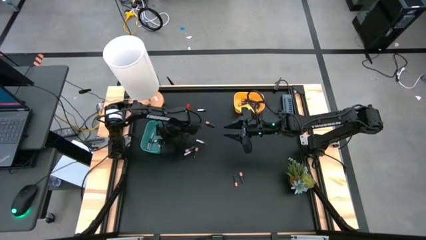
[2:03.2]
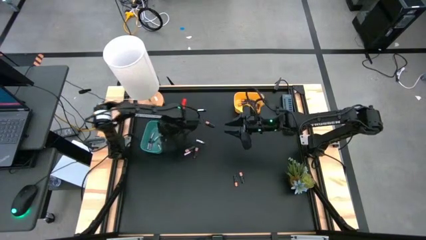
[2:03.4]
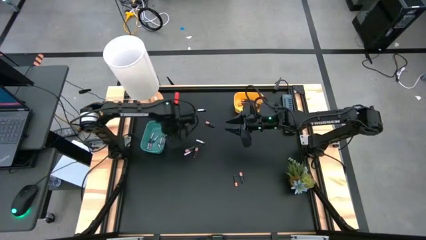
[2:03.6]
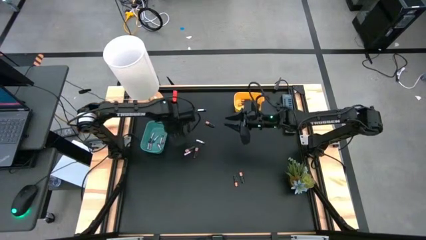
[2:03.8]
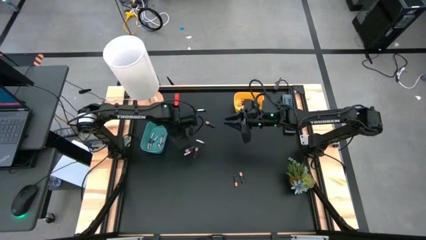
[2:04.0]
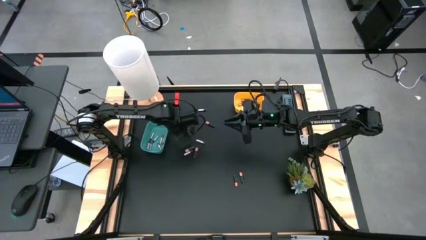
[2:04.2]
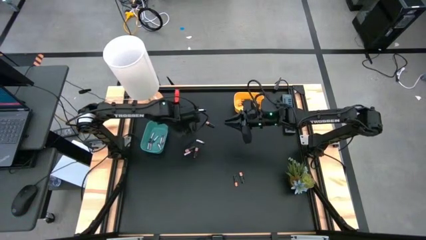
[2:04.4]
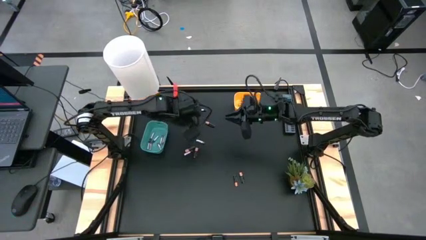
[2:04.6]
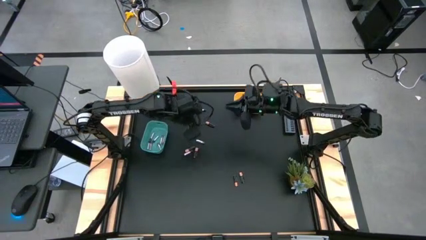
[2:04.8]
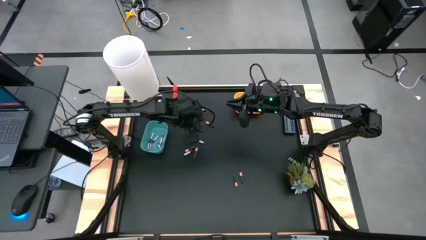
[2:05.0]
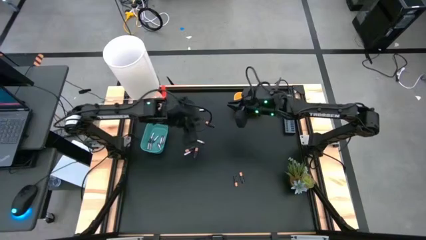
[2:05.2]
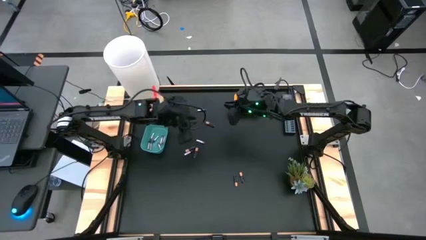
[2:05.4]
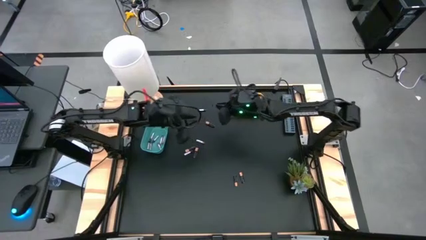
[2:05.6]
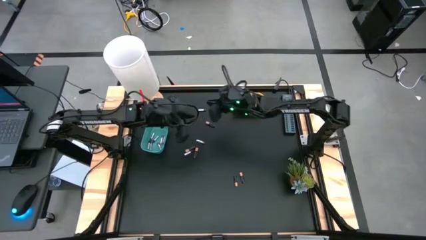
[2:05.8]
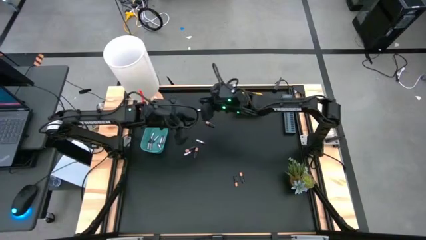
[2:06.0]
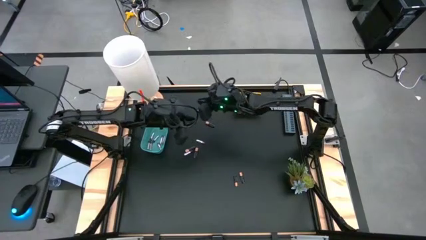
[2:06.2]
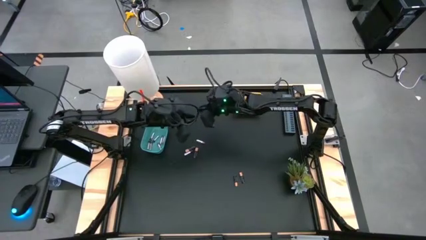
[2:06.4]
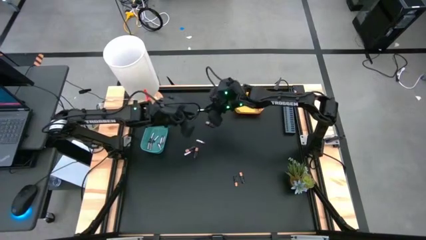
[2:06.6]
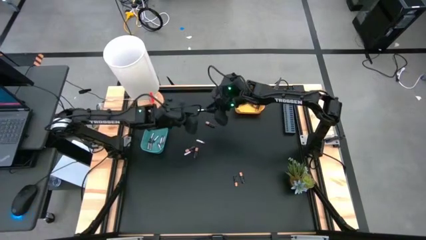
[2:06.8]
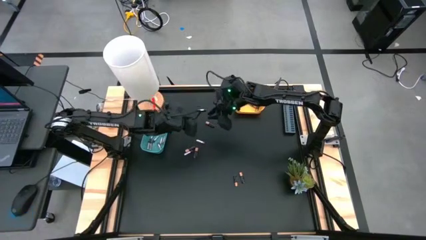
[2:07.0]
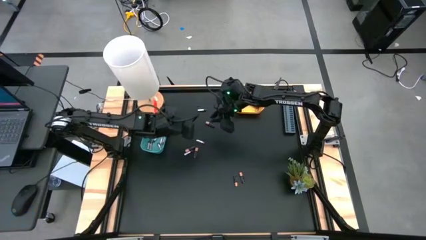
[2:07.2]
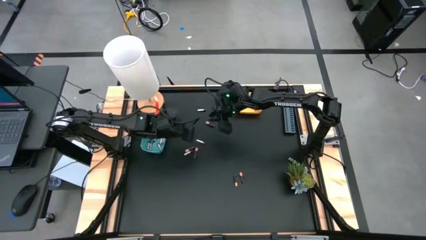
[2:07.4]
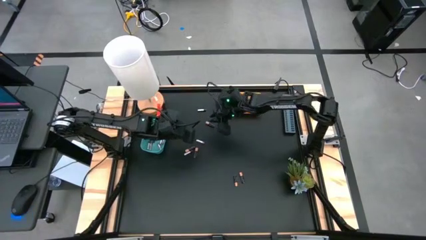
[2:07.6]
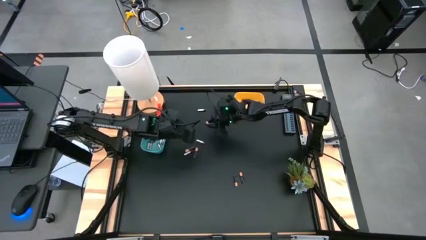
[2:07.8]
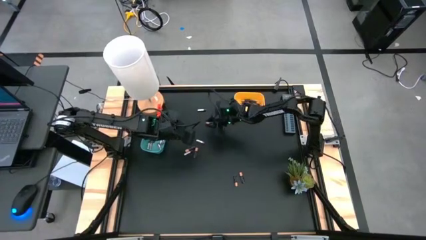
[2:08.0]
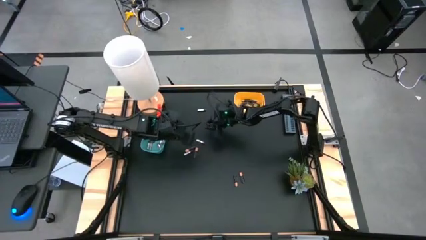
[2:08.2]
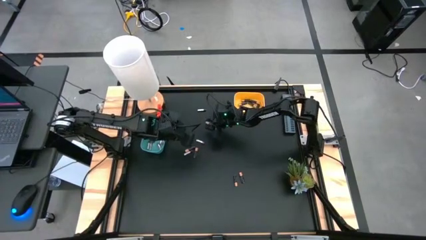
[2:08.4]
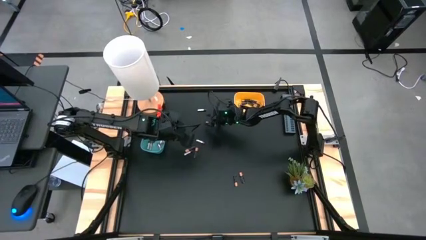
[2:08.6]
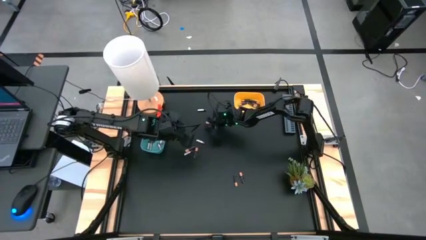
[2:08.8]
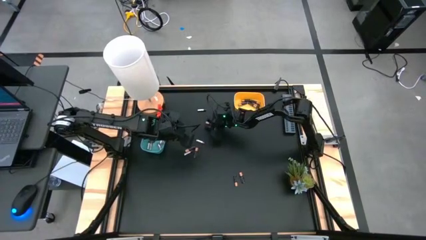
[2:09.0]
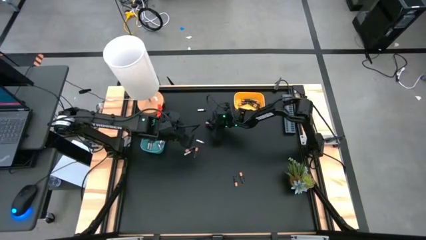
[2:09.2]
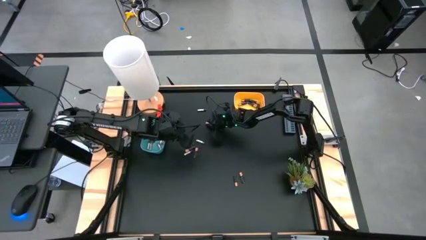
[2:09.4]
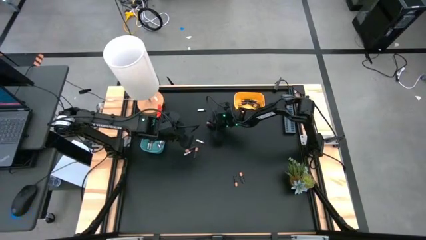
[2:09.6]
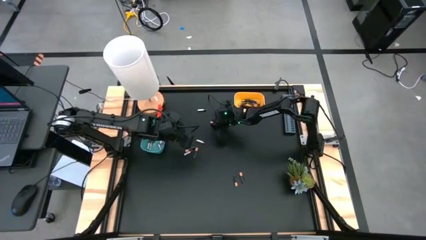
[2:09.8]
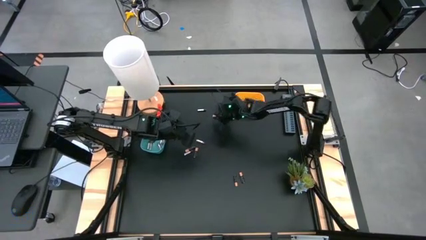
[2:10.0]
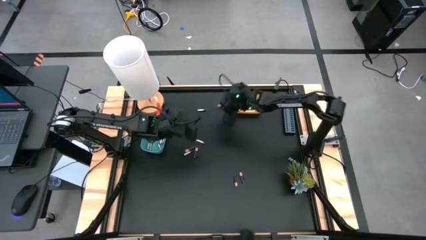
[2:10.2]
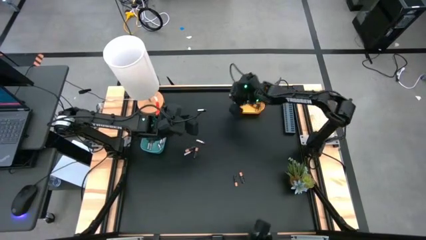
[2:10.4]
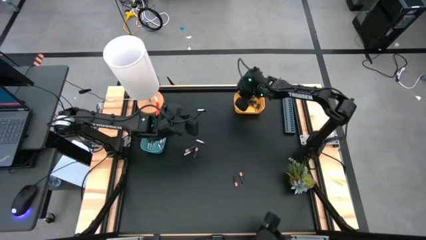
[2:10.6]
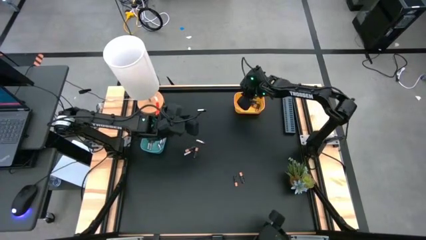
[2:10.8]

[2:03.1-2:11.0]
Task: Sort batteries
Put the black battery into the yellow bin

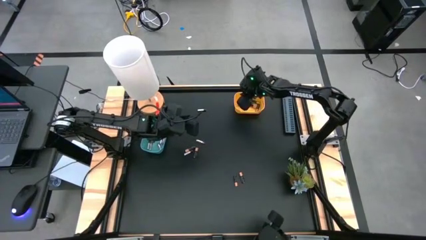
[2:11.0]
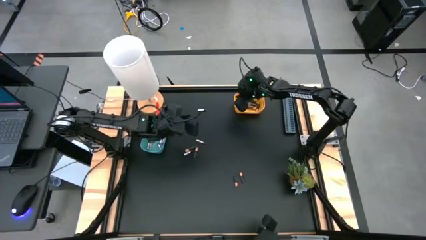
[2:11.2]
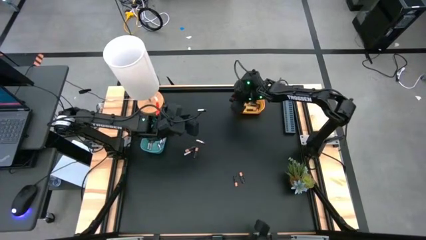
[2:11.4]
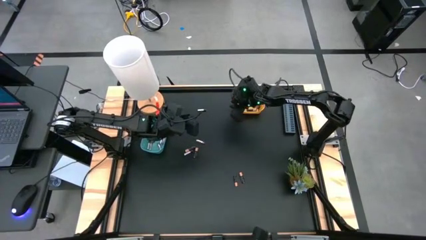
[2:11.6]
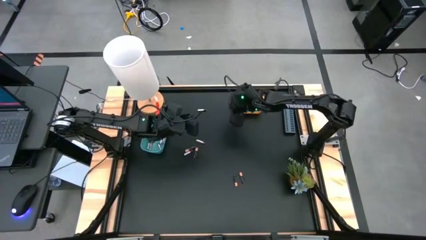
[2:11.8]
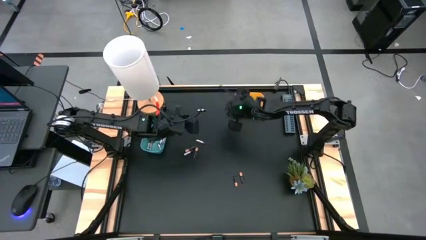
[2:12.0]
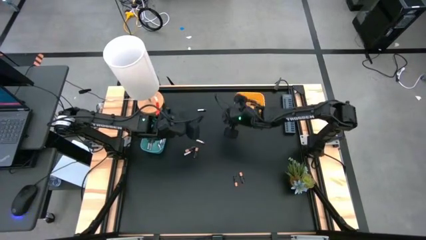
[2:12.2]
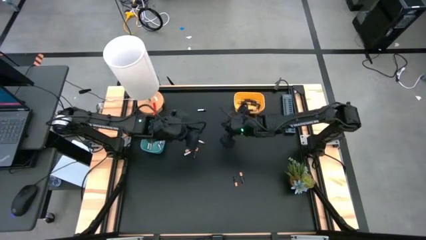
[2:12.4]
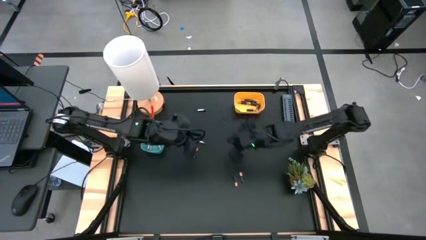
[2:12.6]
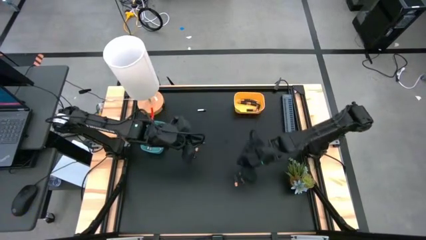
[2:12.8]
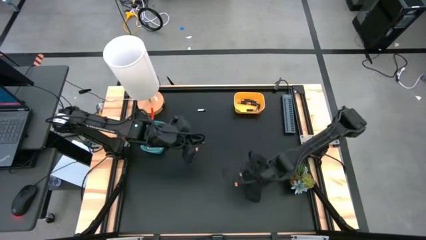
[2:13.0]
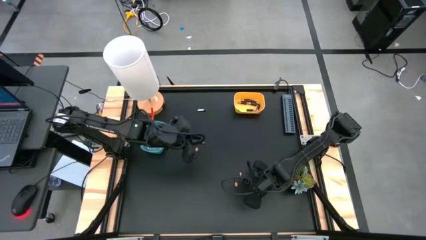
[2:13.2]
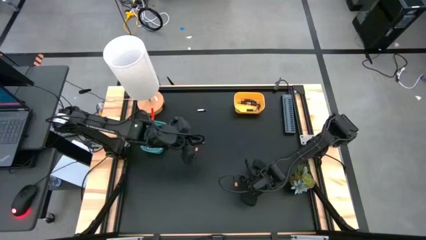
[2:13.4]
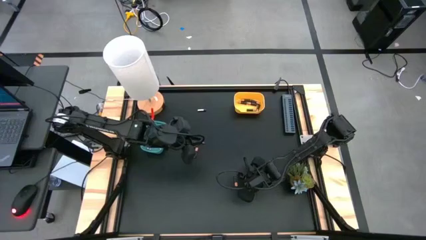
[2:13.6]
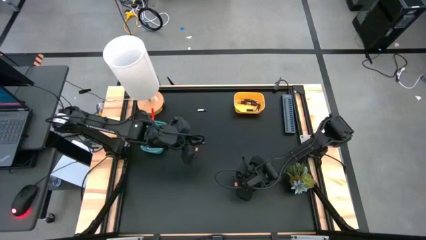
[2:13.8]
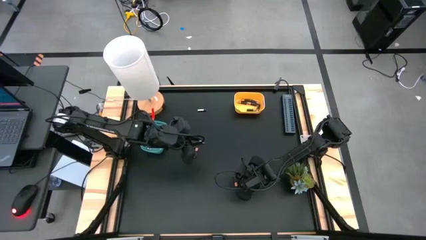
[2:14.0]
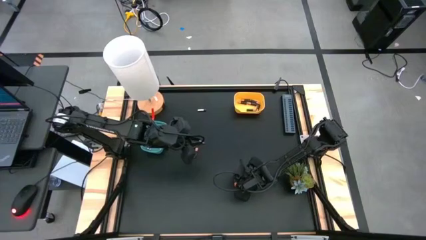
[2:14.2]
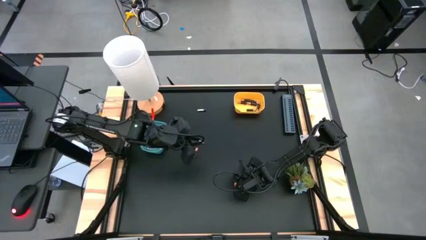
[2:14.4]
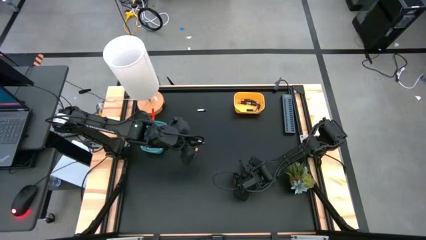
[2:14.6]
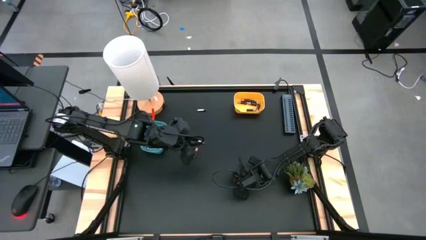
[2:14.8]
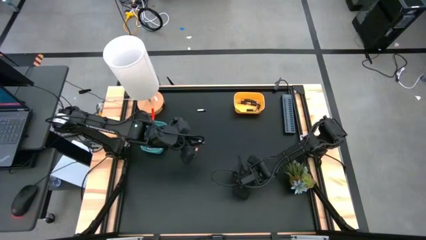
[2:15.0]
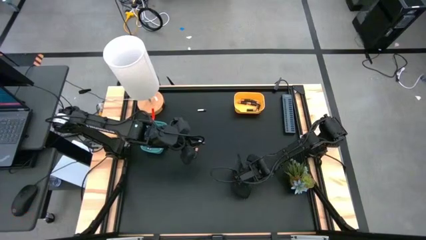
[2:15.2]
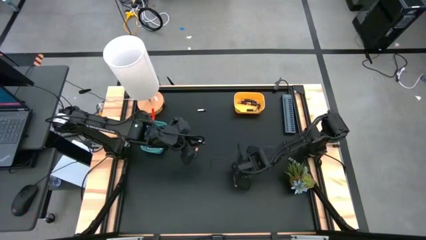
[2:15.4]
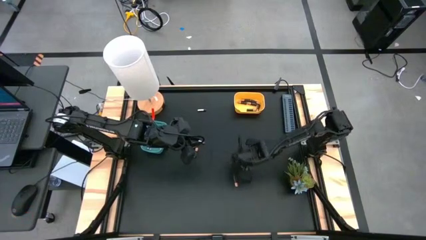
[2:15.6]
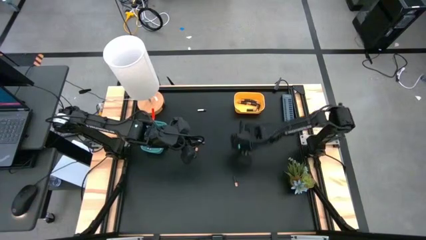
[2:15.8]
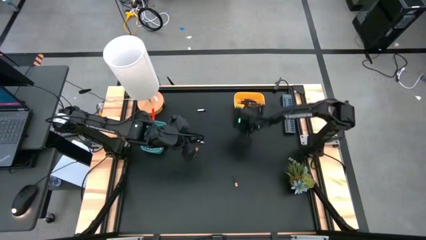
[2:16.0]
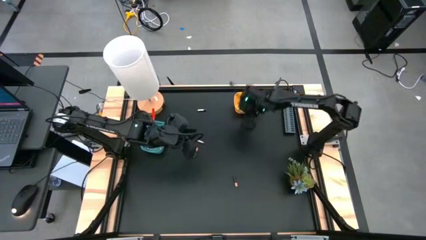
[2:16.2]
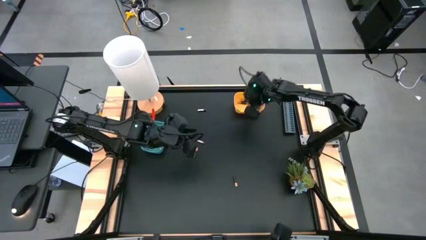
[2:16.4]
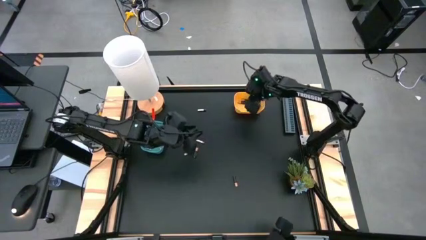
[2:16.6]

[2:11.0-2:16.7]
Put the black battery into the yellow bin

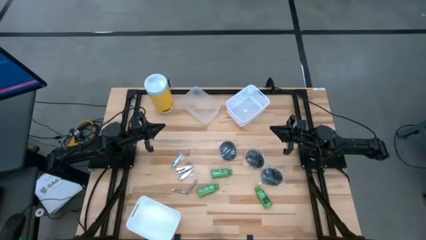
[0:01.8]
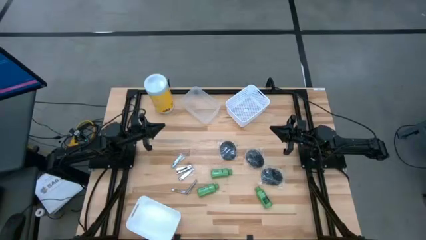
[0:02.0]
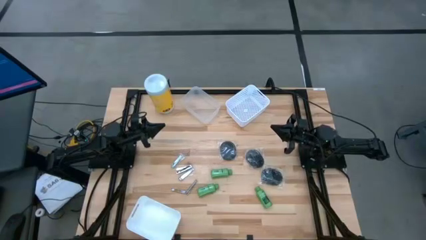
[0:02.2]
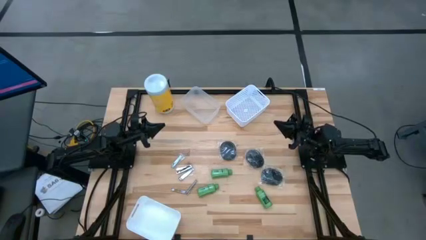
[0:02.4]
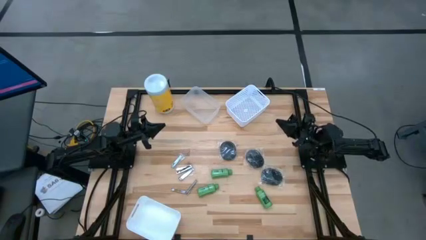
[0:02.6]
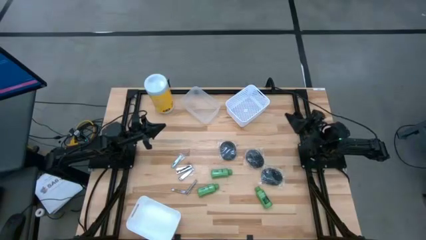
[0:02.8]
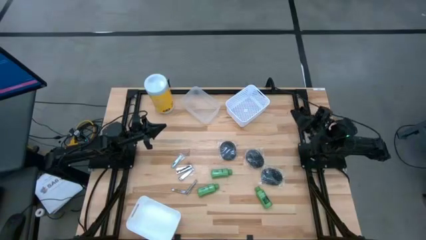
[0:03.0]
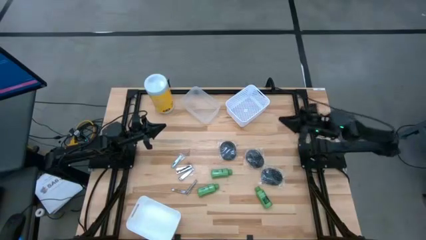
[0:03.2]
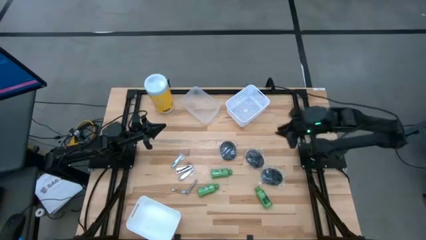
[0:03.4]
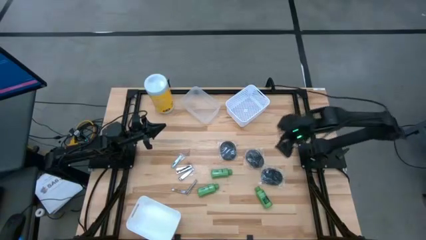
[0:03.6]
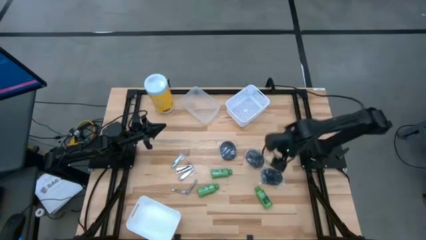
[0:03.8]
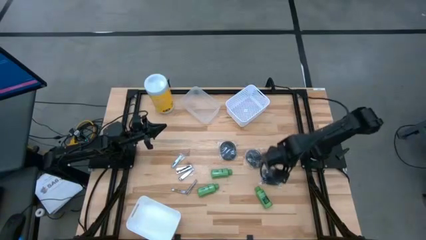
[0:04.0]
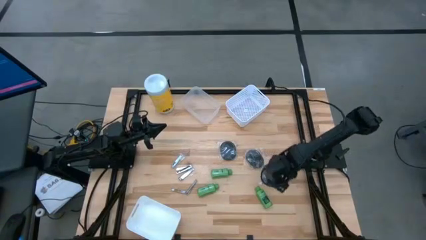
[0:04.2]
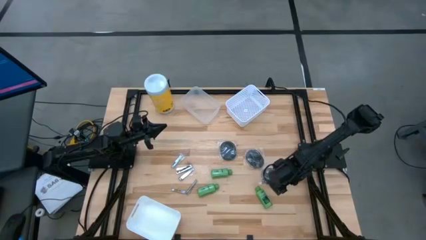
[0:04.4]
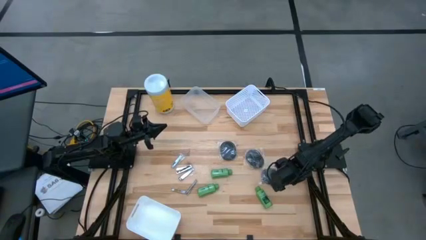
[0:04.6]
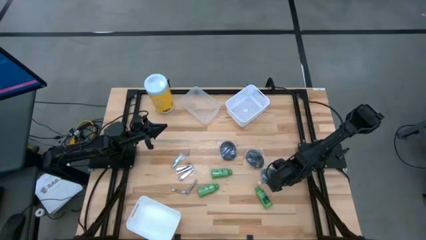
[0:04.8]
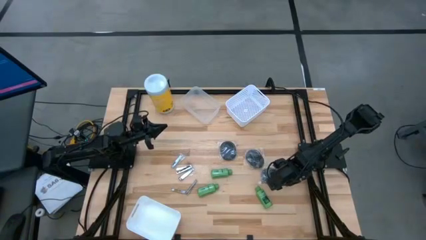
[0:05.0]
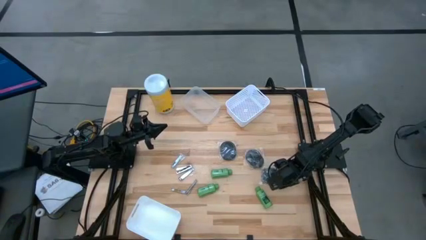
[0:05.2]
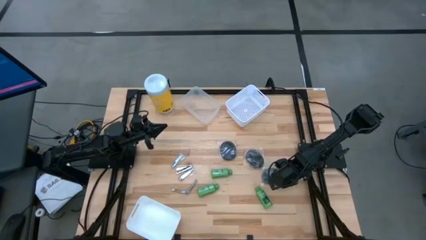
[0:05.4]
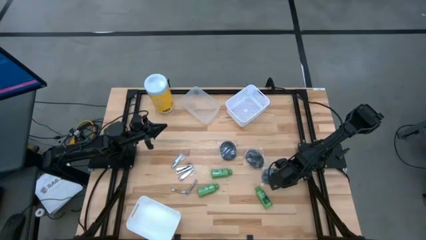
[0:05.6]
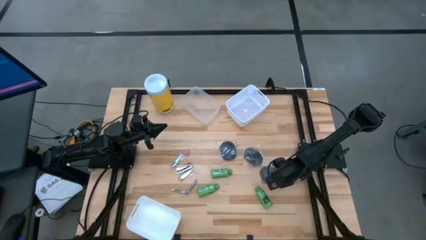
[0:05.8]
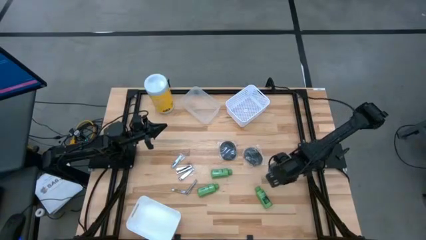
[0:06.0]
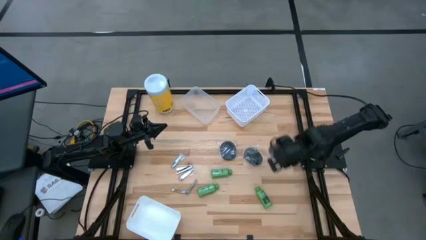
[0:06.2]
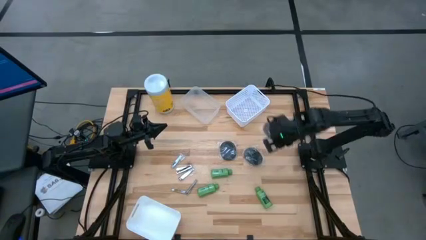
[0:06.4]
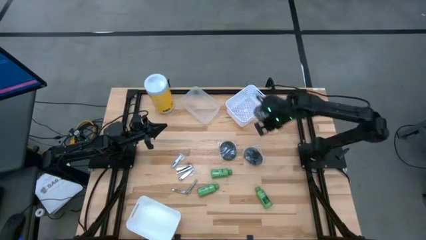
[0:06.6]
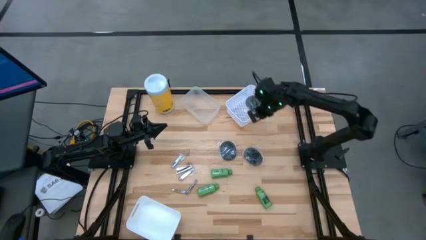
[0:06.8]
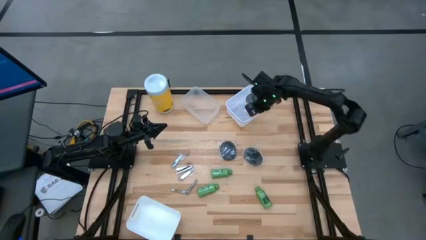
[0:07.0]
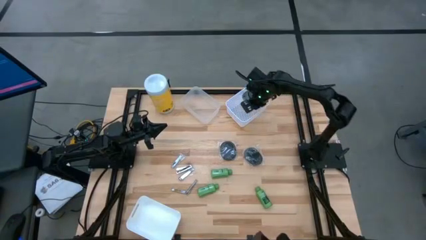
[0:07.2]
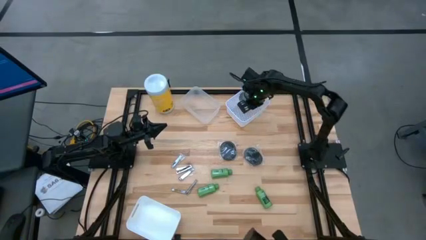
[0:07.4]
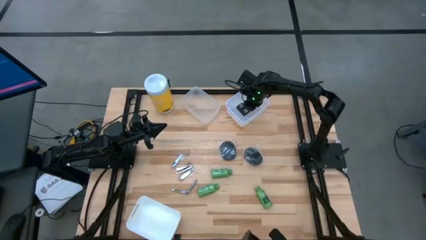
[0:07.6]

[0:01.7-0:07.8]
Task: Pick & Place Travel size toiletries
Put the black hairbrush into the top white bin
